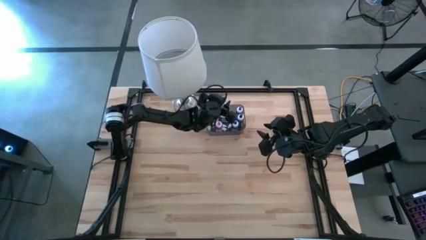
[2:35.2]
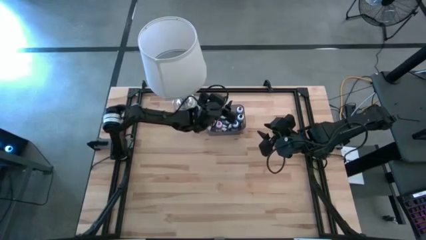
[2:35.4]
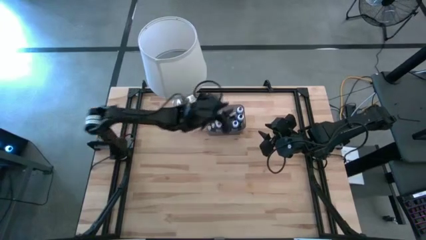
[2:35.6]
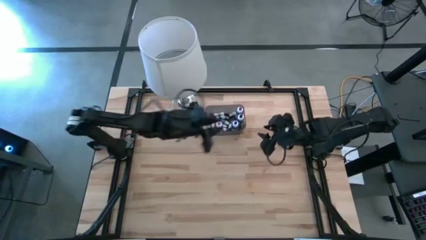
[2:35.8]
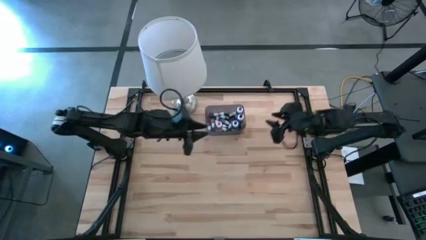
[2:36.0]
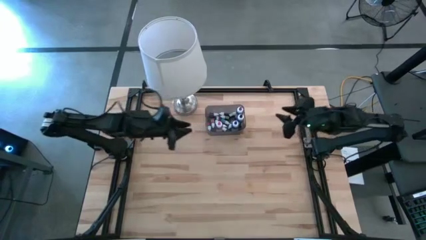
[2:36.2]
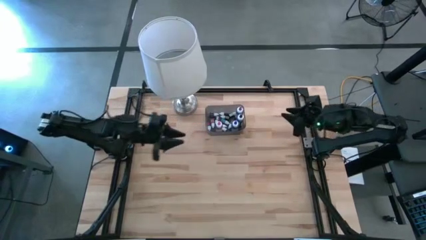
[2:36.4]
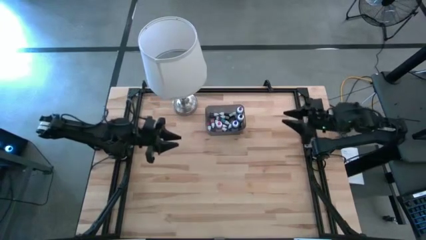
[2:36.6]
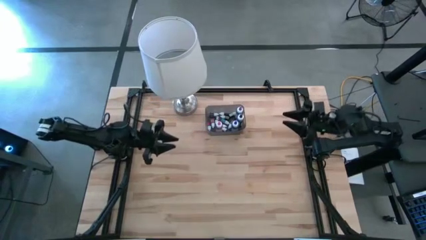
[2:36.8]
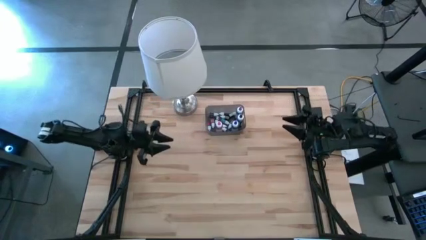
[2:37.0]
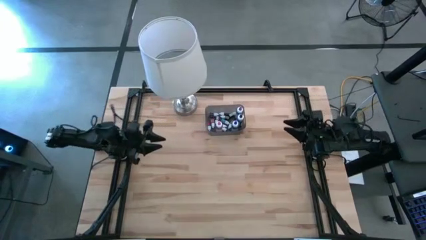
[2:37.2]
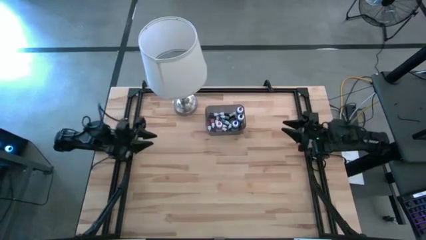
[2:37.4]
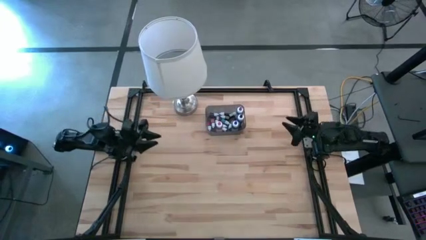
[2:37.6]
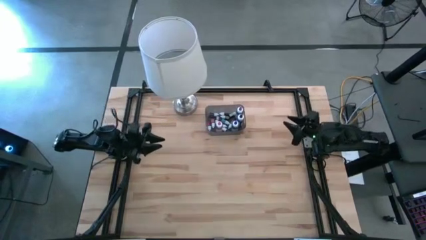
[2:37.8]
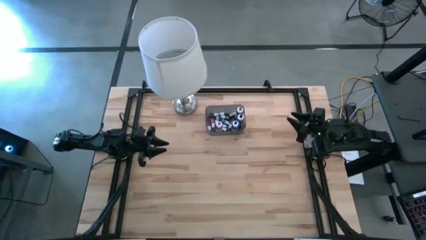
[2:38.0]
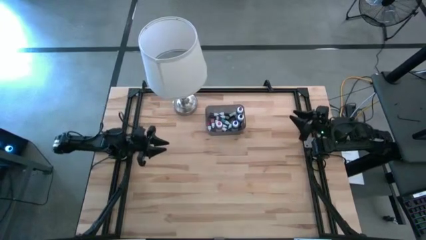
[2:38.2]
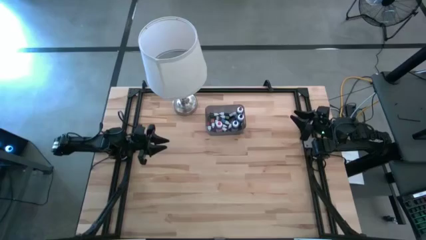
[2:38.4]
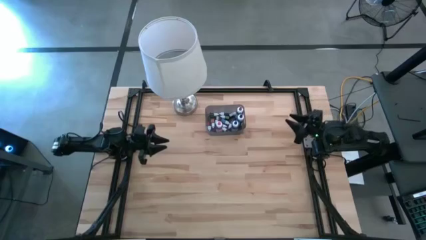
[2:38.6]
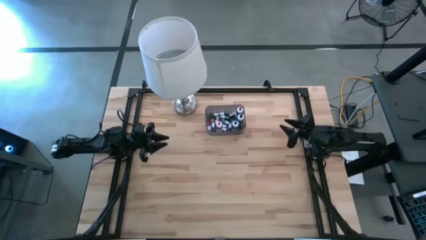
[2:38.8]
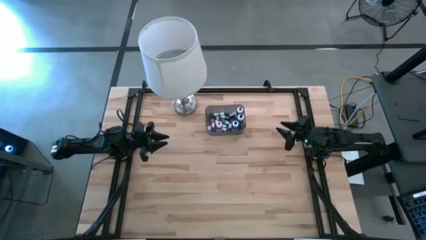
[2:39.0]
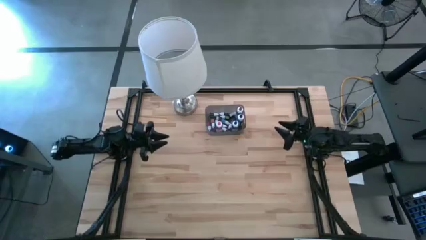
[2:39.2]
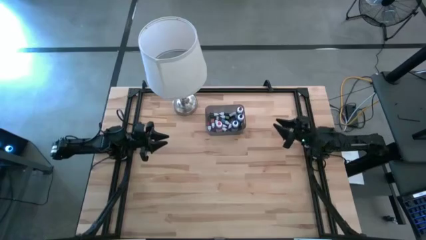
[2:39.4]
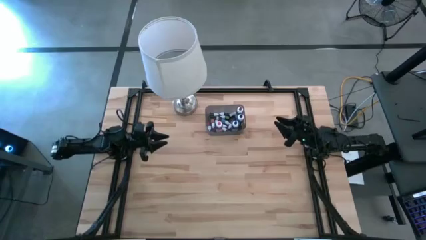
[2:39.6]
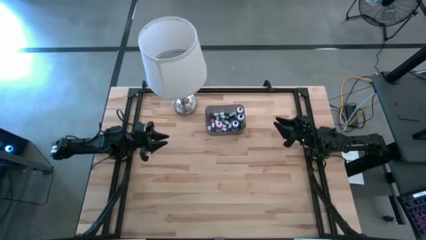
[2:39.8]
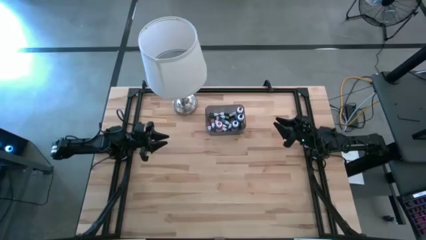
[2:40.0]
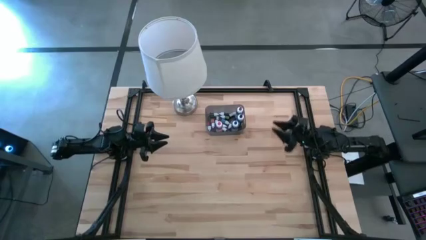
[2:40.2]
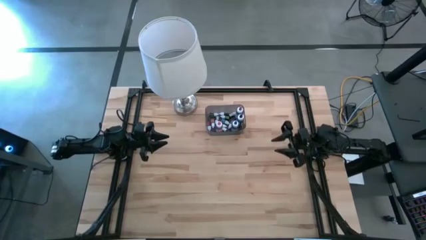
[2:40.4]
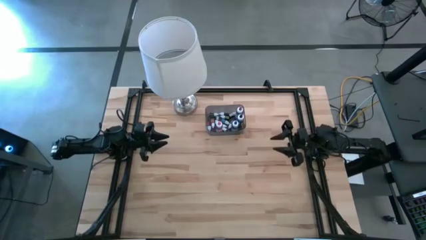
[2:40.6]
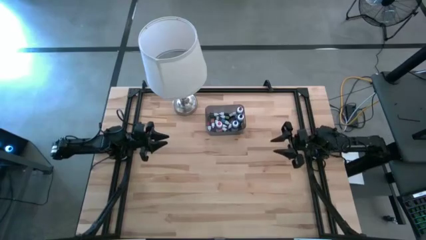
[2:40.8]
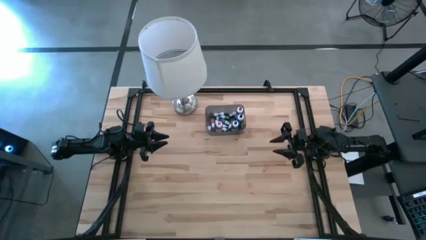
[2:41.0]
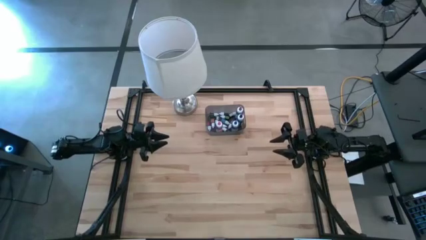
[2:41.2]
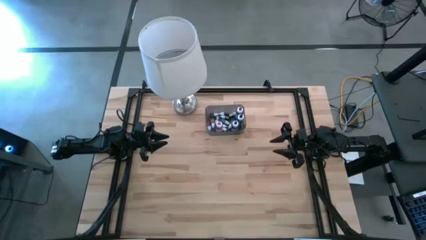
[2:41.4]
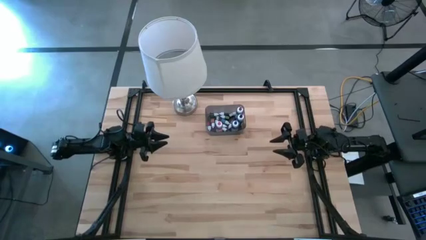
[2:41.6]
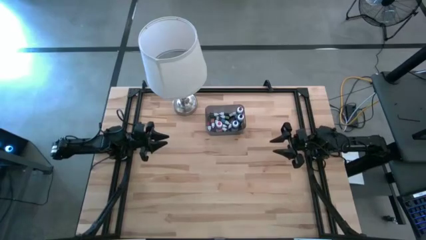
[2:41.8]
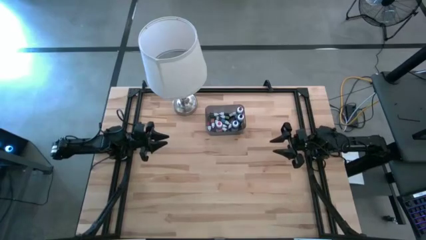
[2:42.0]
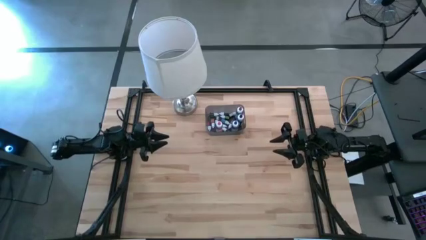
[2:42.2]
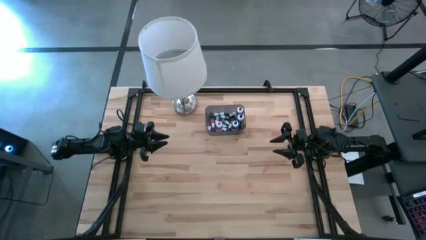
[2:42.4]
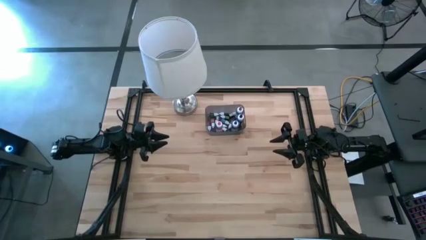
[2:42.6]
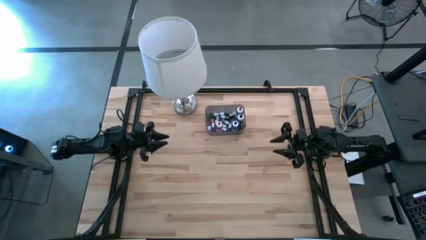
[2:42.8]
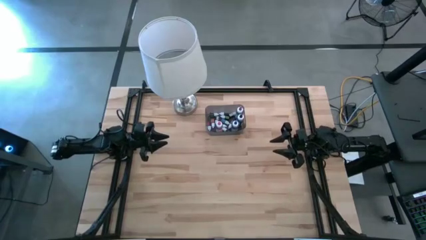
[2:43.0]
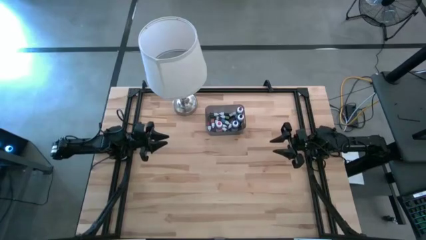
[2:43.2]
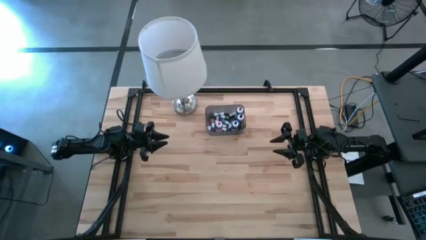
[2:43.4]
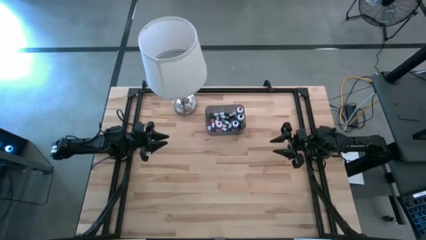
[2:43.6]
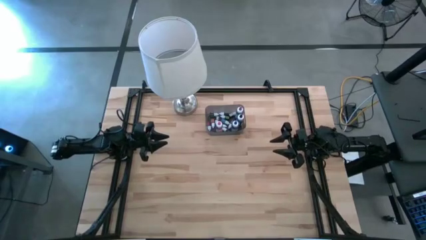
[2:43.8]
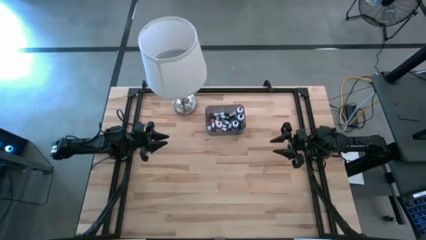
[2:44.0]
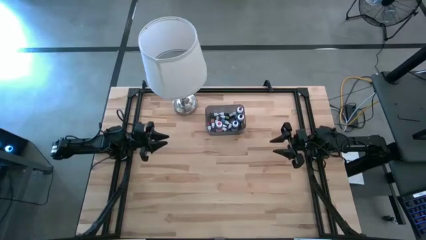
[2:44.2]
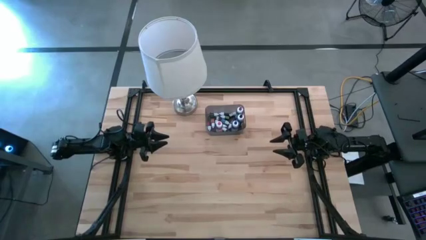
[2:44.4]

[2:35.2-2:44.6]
Task: Pick & Place food coloring
Return to Home Position

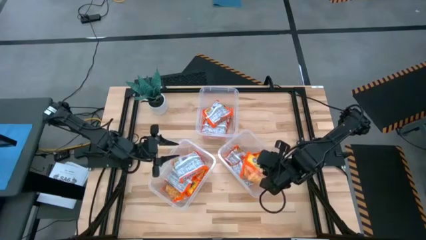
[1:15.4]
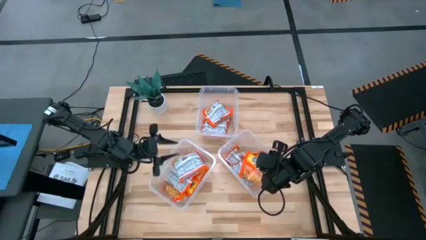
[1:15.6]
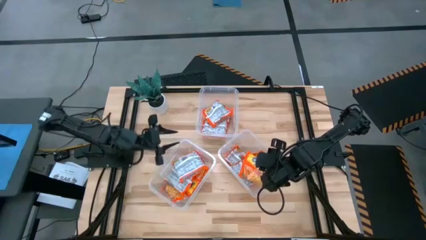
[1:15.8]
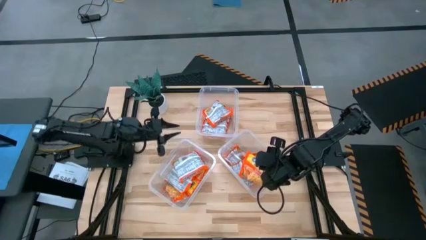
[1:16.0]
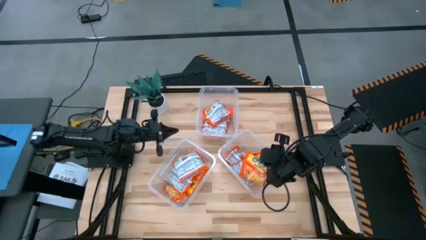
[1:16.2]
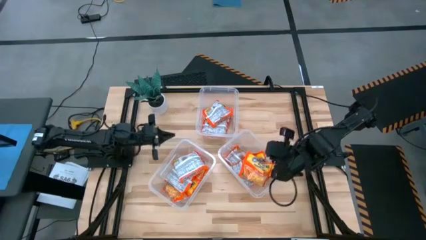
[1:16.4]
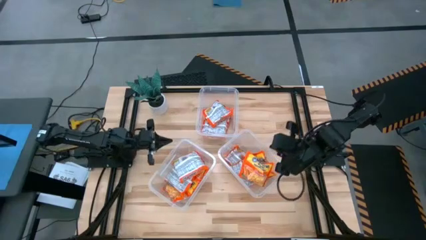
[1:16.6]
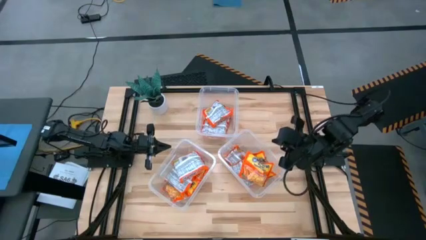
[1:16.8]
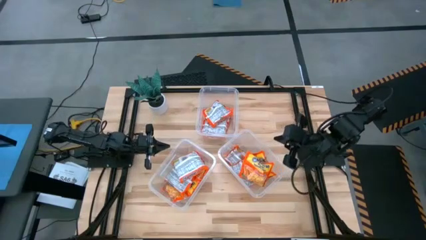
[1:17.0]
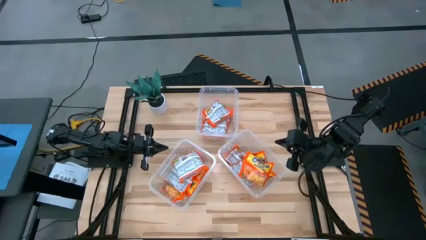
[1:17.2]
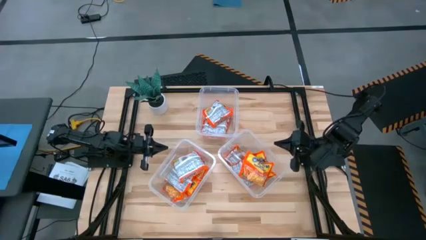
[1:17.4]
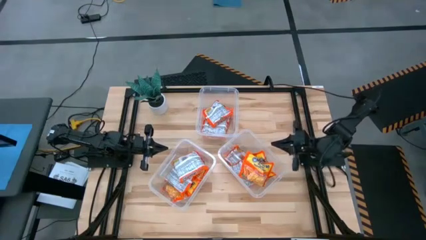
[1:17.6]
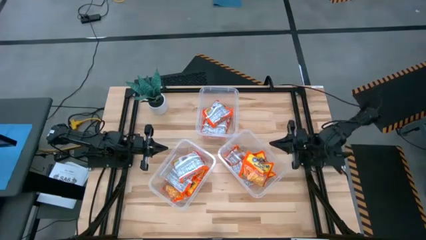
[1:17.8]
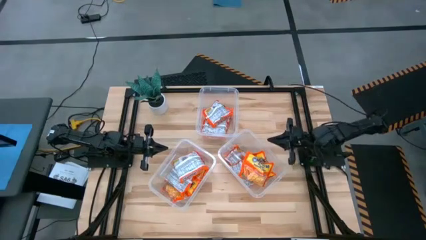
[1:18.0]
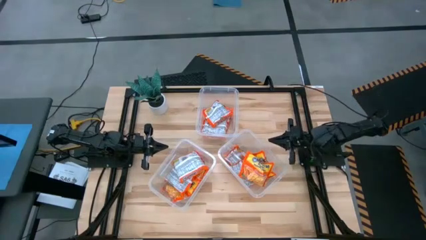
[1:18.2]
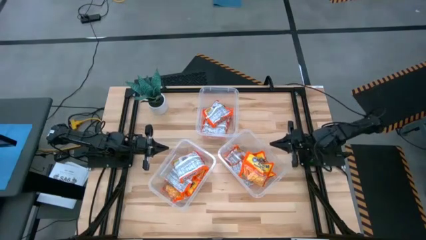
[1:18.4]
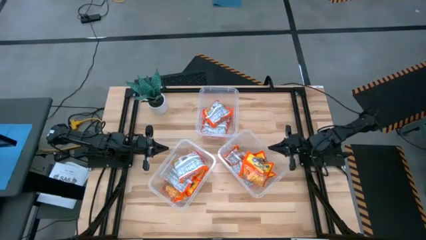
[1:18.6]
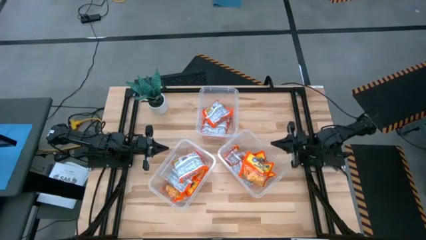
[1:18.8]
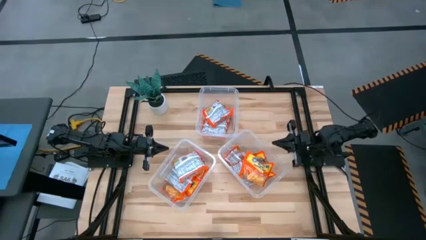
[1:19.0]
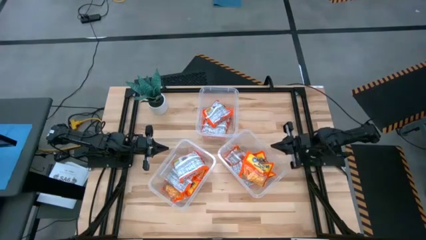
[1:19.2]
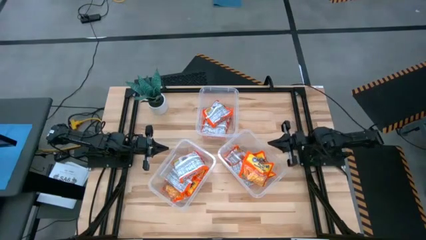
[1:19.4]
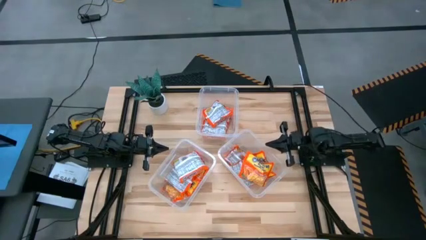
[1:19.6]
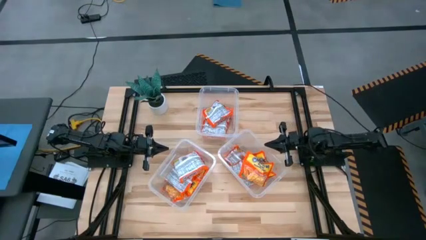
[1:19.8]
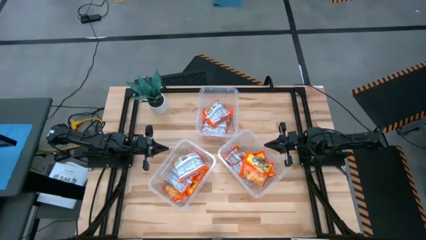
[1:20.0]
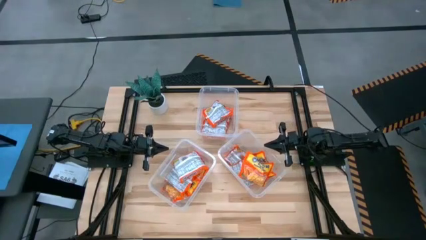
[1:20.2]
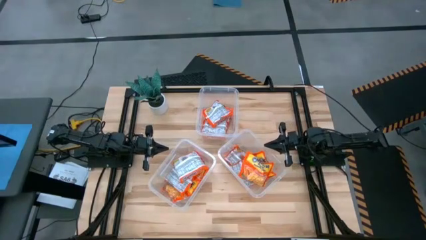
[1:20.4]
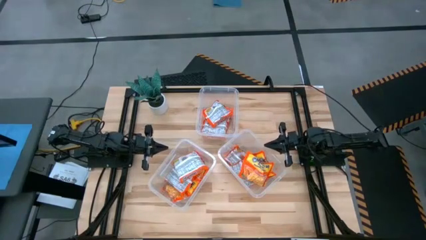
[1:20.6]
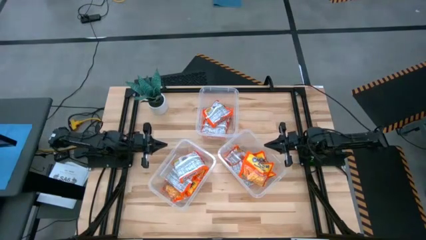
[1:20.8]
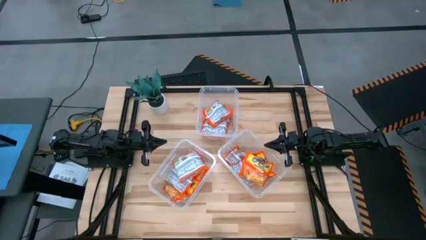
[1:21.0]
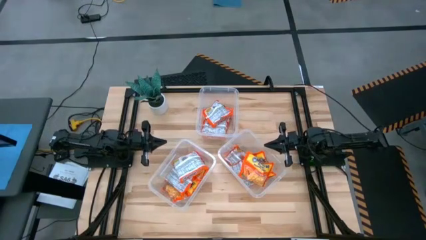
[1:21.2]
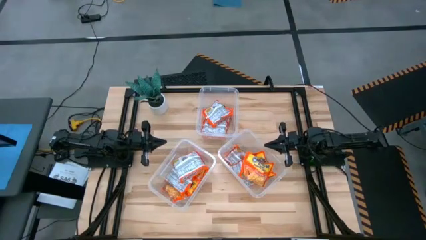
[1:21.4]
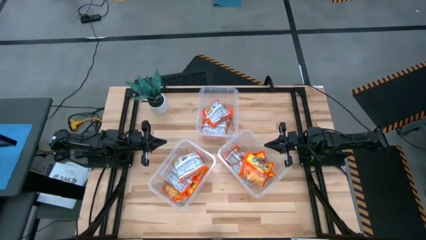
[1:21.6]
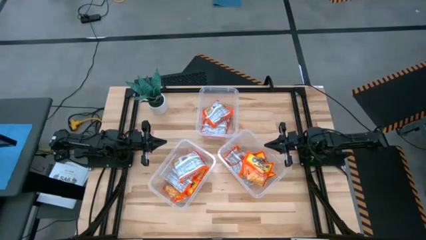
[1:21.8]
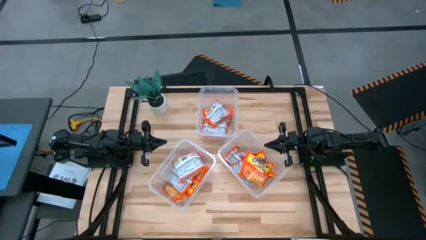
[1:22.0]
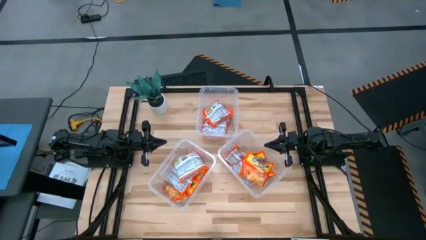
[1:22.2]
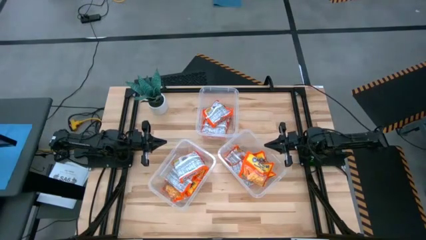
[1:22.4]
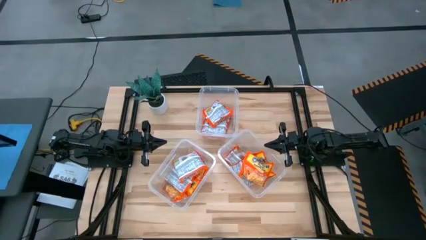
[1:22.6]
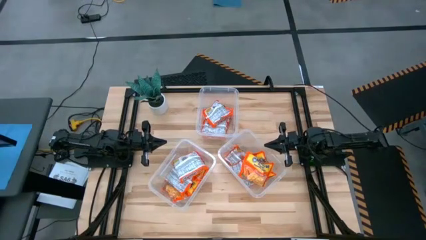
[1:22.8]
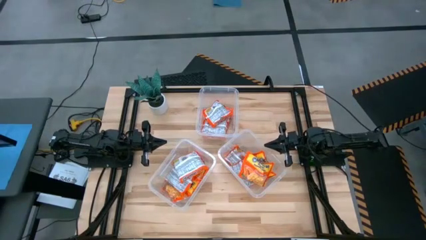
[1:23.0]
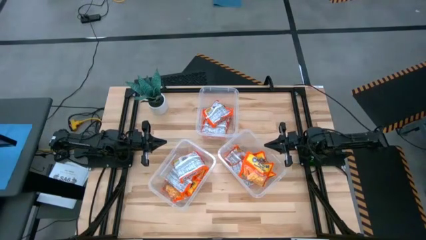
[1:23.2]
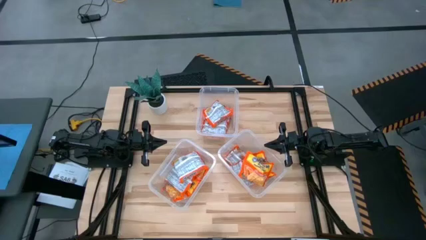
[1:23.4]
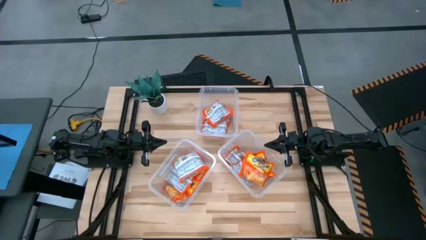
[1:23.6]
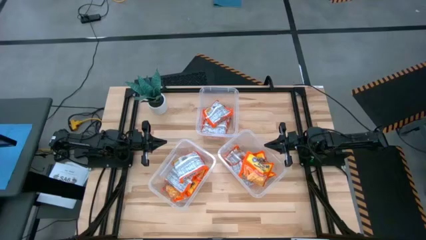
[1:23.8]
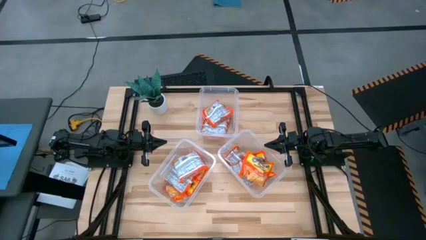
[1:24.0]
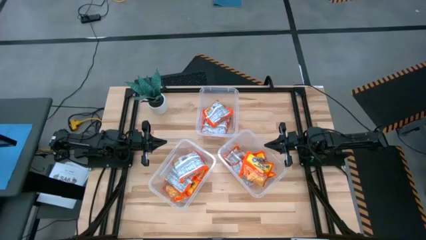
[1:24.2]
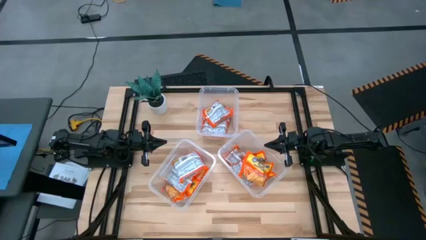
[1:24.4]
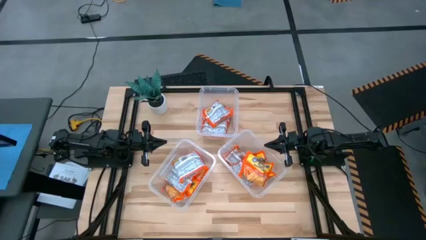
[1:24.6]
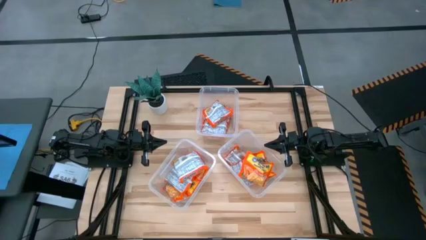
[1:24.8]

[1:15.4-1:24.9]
Task: Sort Maruchan noodles
Return to Home Position
